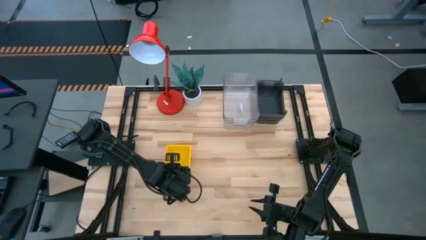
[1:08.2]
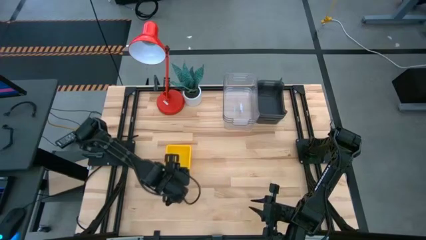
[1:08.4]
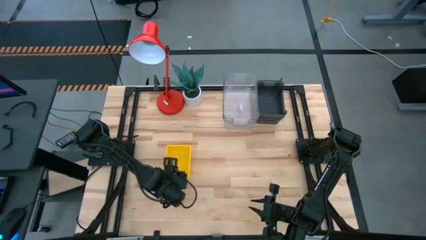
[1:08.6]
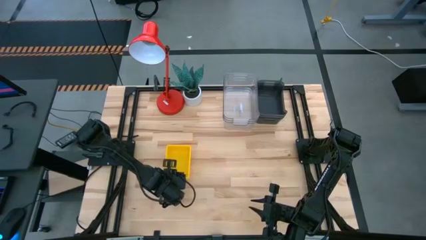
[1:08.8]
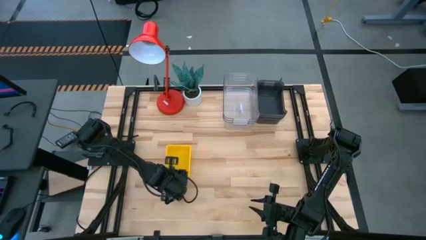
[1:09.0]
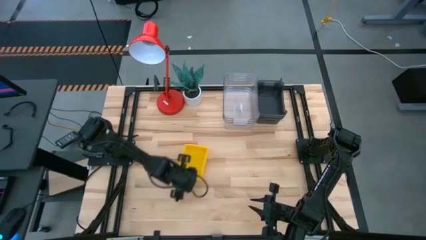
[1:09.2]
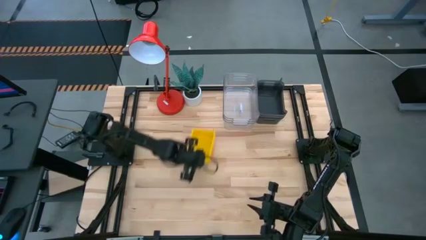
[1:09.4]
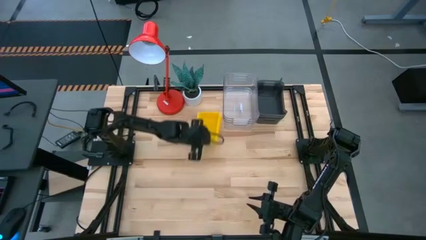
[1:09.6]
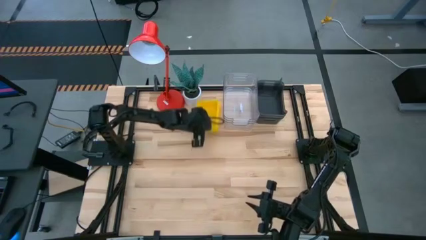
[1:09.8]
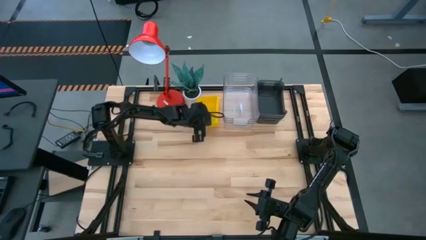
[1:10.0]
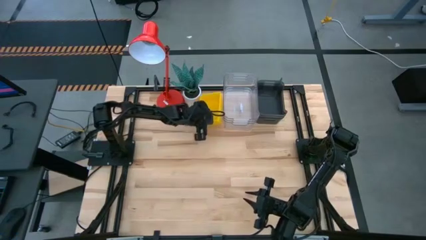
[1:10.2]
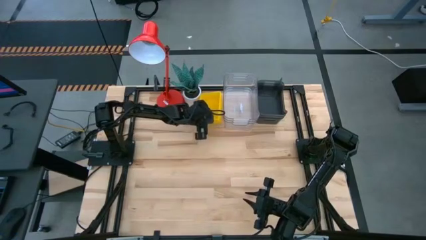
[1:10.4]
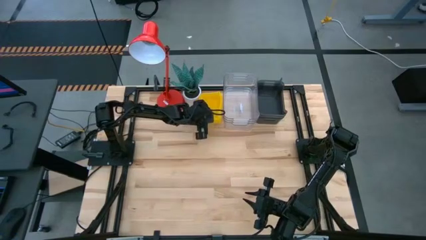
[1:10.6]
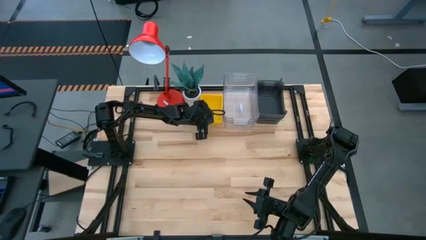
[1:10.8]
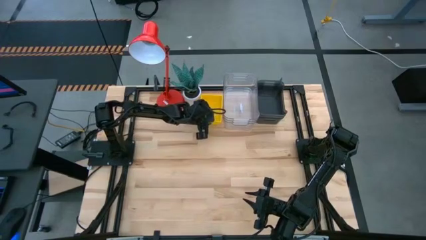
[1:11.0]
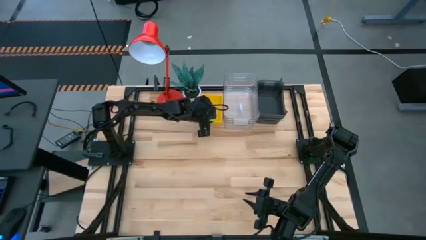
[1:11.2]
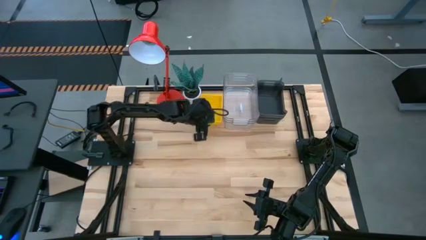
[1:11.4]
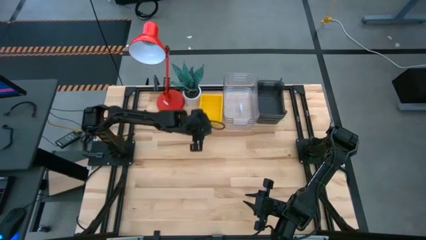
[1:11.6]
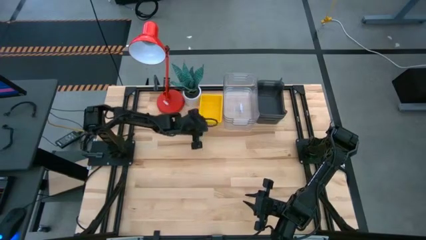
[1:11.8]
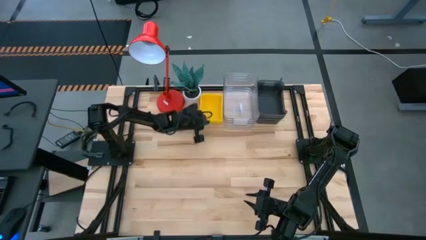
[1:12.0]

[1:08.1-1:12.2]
Move the stacked yellow bins to the top left of the table

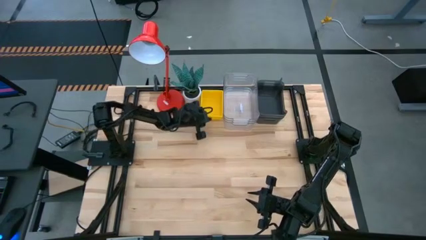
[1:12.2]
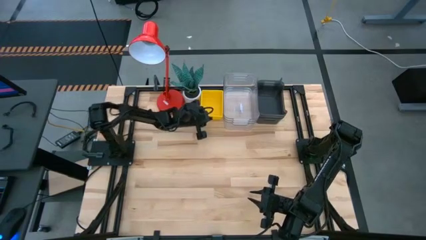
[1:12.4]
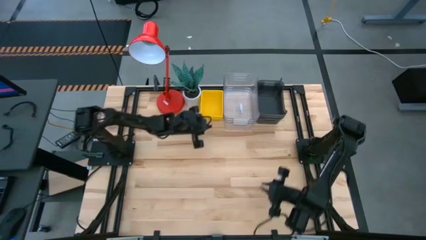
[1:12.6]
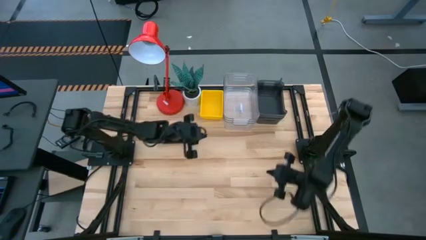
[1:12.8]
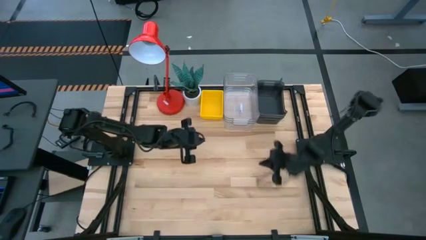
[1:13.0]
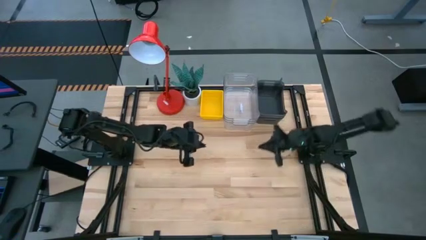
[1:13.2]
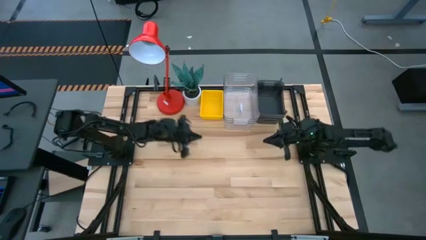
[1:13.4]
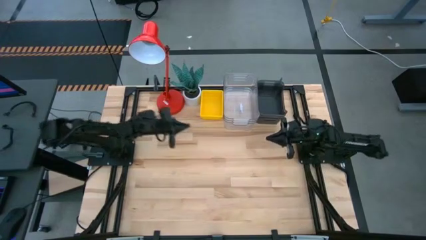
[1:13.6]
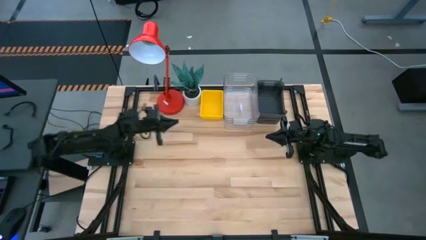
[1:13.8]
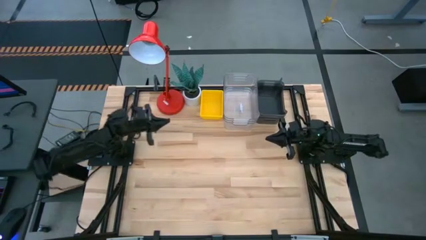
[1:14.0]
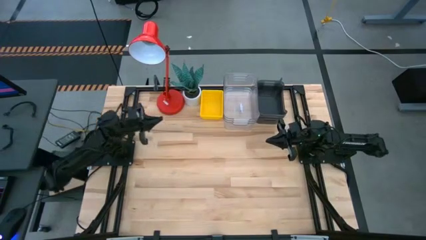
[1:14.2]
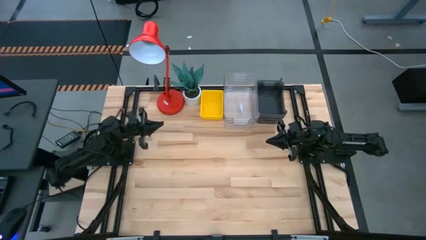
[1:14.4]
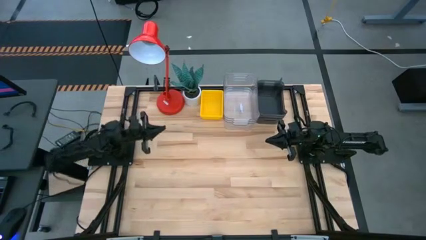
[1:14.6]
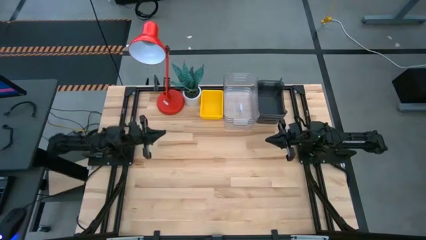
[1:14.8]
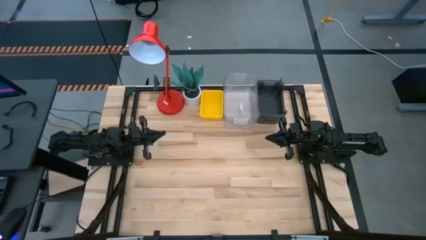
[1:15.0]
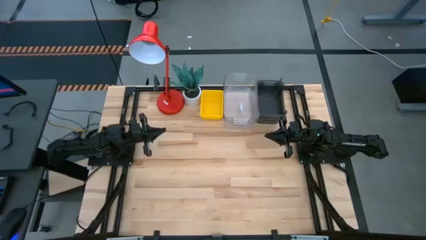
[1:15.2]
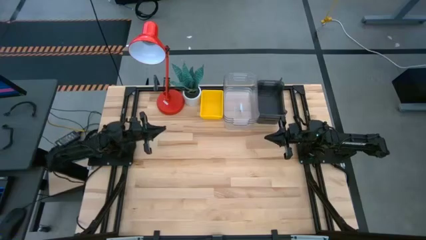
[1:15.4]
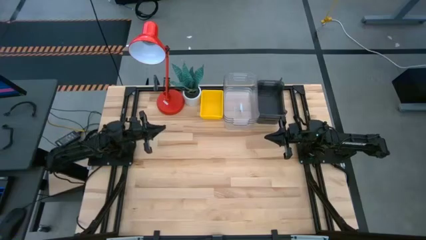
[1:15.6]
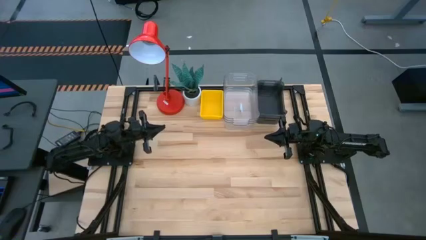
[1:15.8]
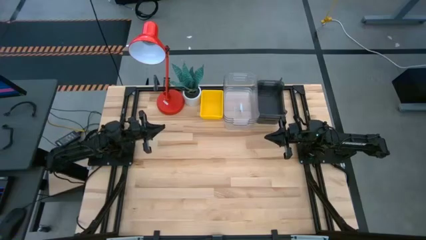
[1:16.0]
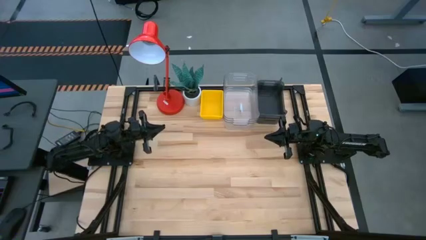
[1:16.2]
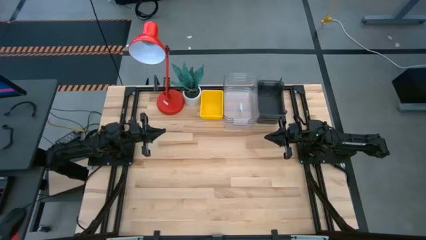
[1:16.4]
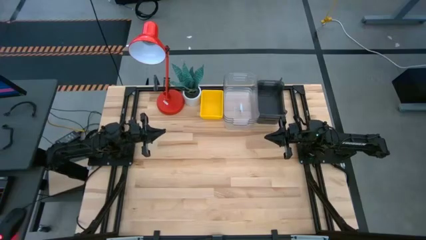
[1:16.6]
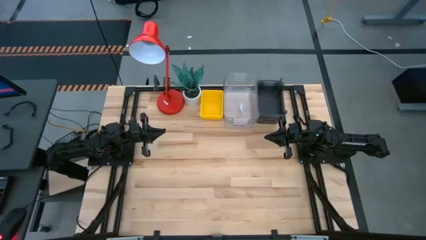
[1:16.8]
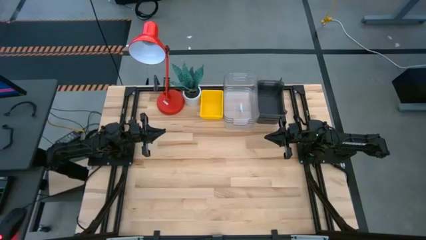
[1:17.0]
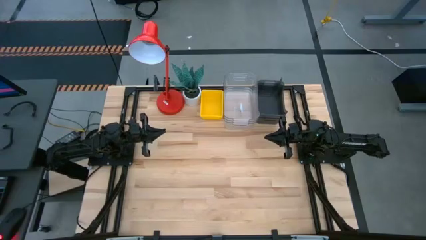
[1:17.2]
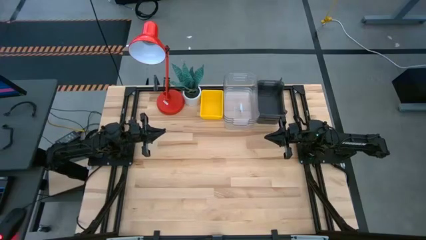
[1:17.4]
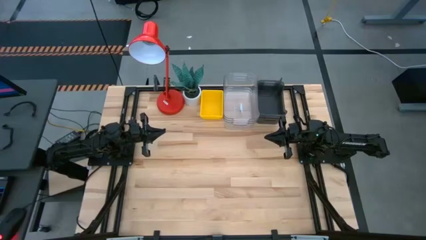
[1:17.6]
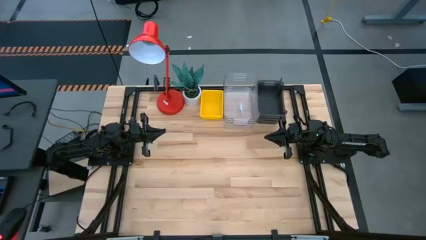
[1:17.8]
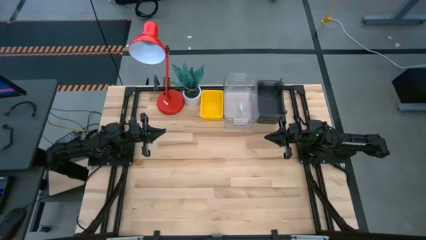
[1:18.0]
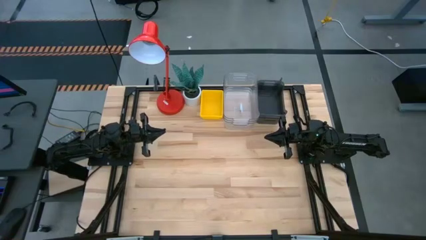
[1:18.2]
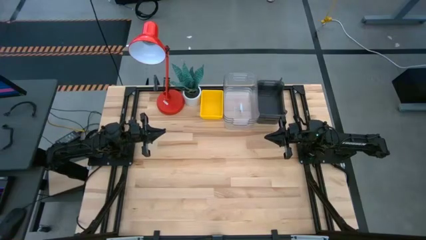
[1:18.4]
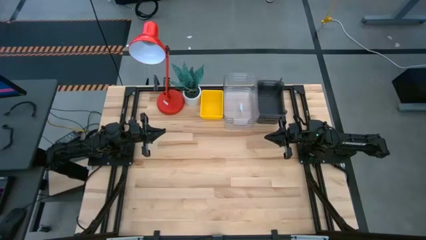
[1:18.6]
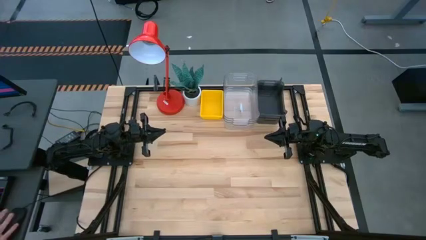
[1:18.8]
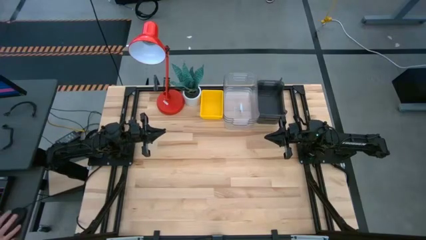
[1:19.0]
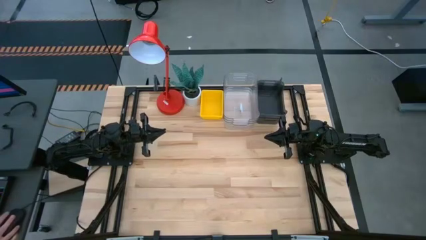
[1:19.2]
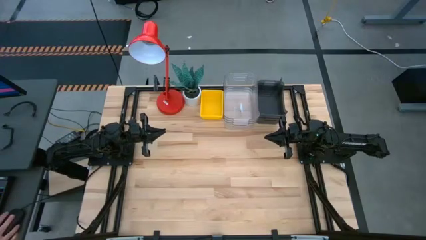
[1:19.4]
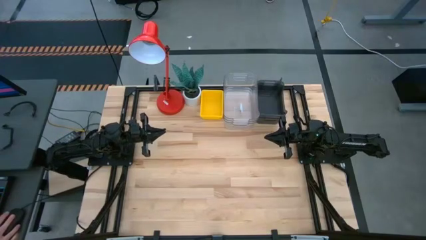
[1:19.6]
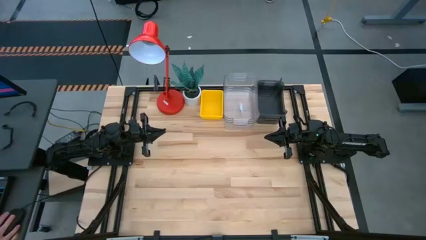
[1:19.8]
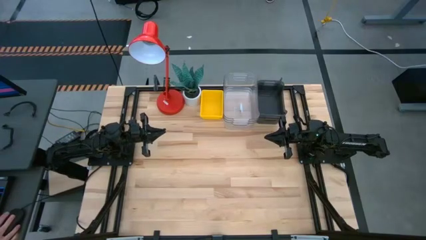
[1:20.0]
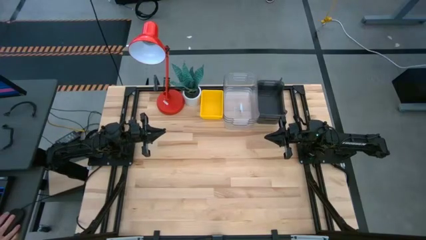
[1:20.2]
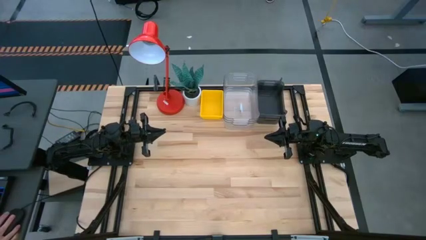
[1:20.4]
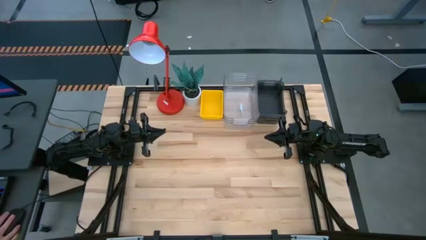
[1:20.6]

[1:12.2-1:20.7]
Return to Home Position

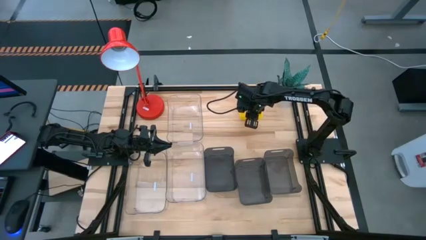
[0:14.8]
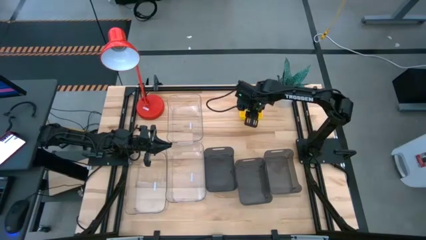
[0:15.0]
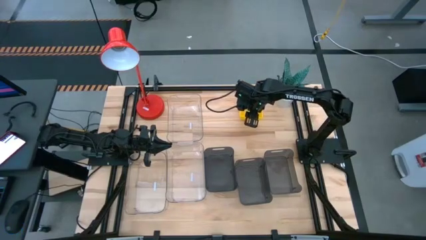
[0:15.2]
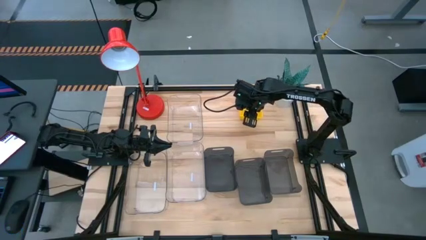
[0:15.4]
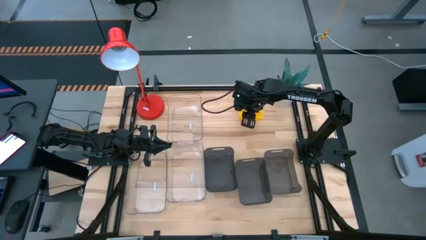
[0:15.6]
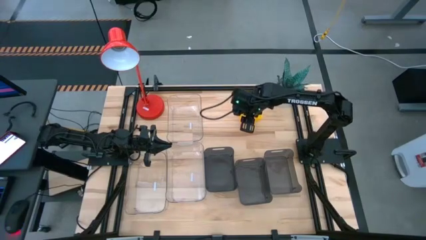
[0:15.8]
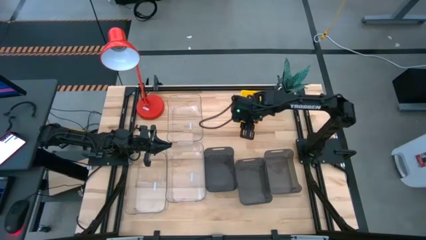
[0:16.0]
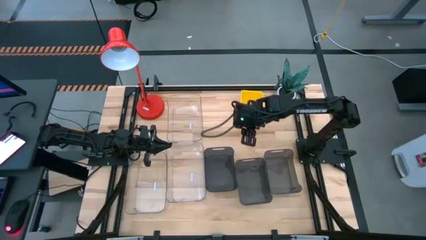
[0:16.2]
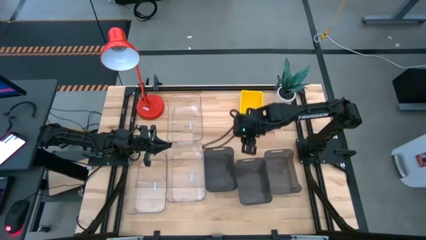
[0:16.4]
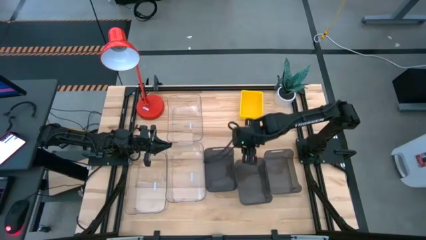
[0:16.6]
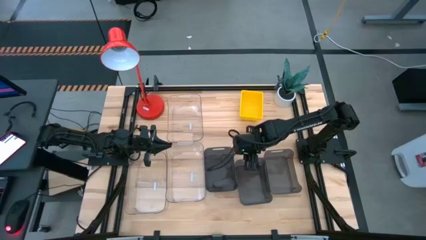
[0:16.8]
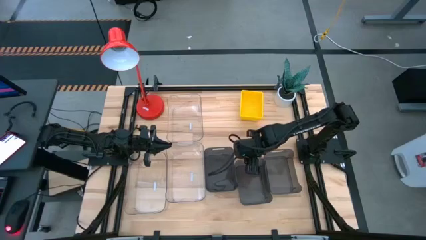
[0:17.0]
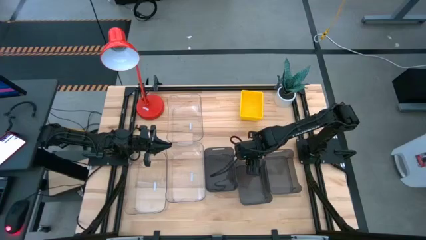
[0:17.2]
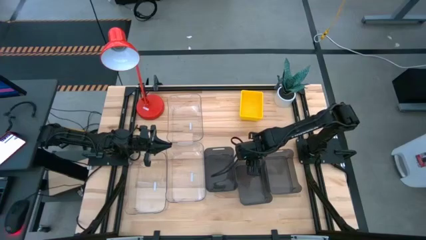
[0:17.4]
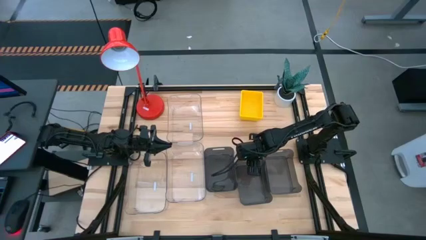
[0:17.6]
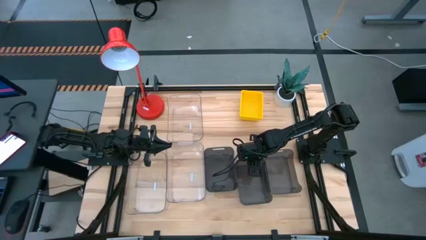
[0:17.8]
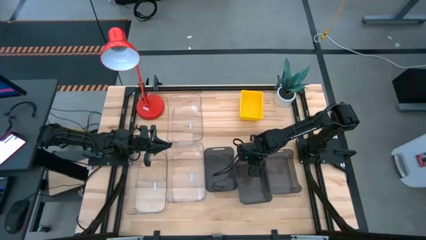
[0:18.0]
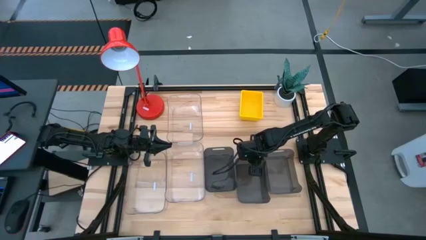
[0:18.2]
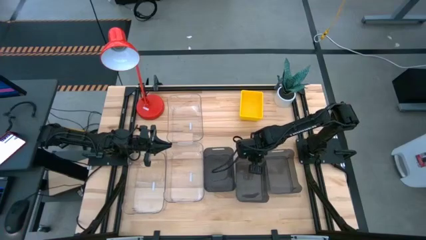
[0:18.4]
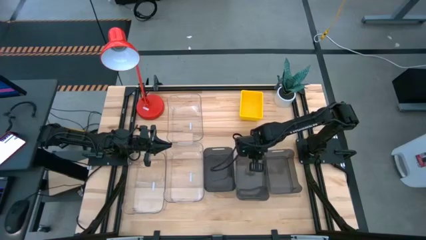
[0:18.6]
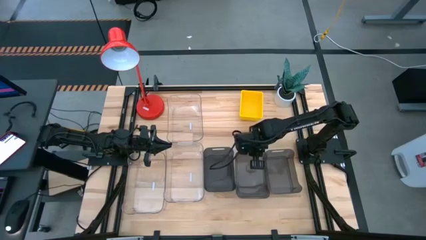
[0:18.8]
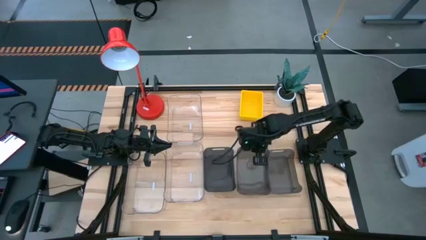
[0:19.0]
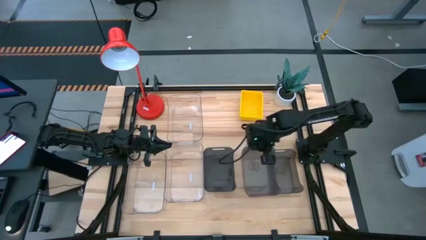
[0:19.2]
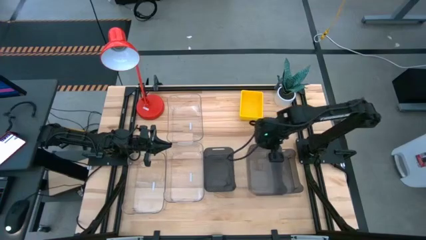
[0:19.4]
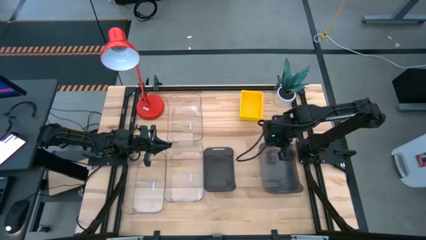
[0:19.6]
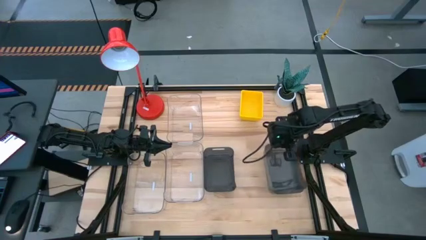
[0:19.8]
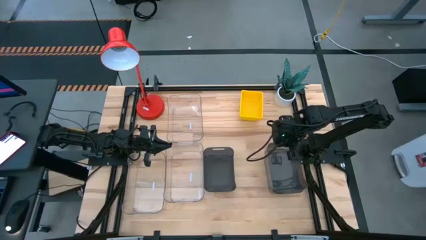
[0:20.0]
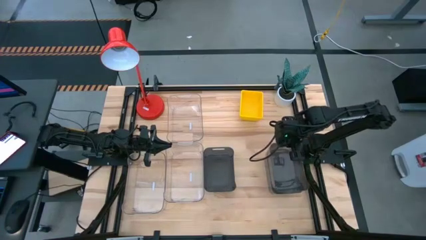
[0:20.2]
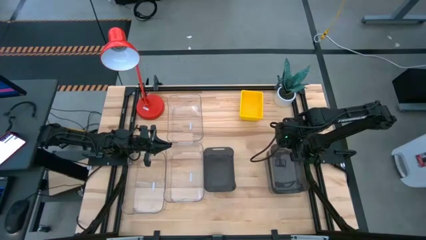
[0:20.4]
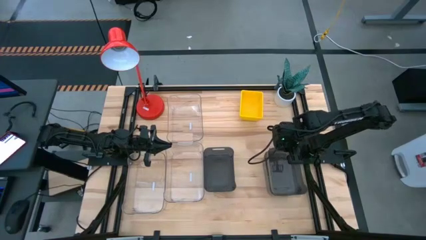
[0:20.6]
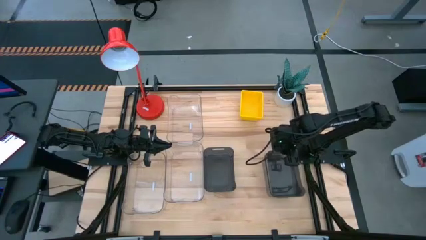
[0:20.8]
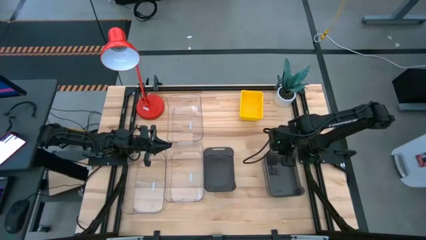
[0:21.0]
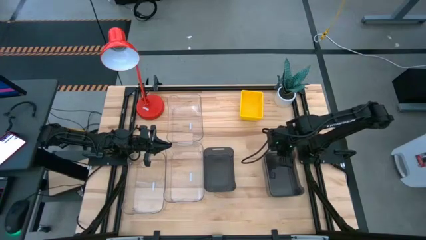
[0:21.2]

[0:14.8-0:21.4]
Stack the middle black bin on the right black bin
